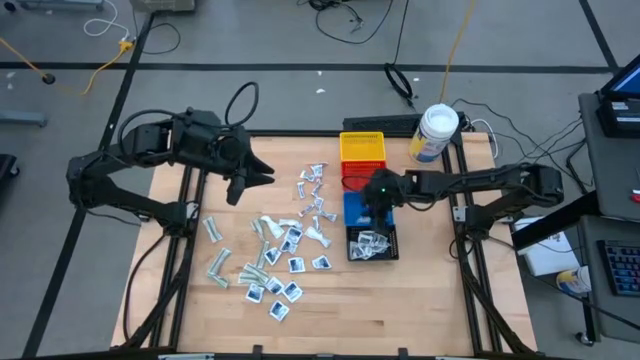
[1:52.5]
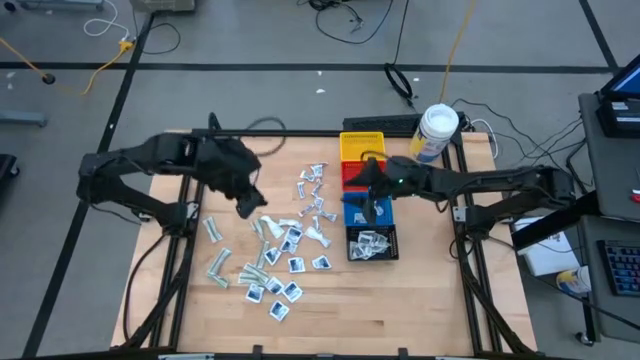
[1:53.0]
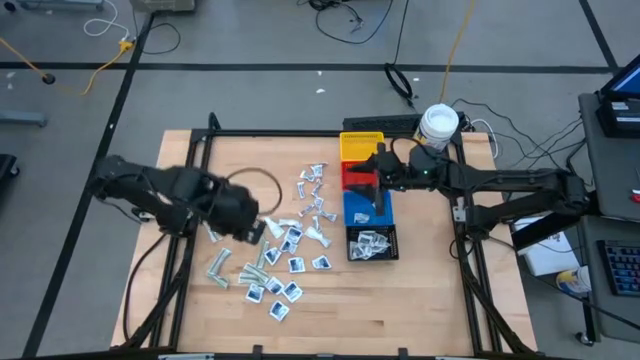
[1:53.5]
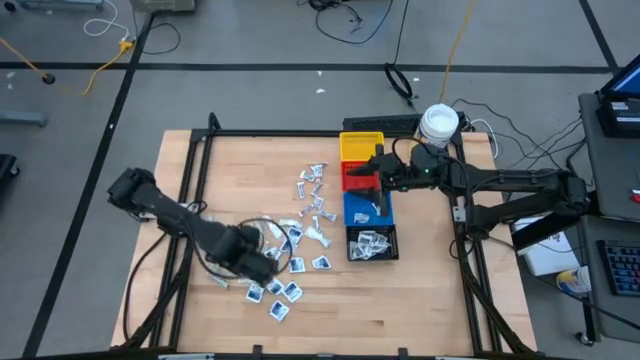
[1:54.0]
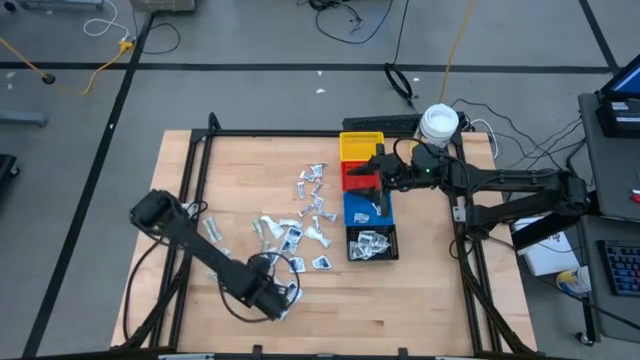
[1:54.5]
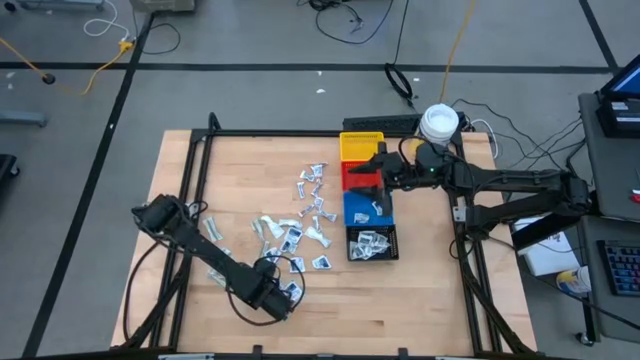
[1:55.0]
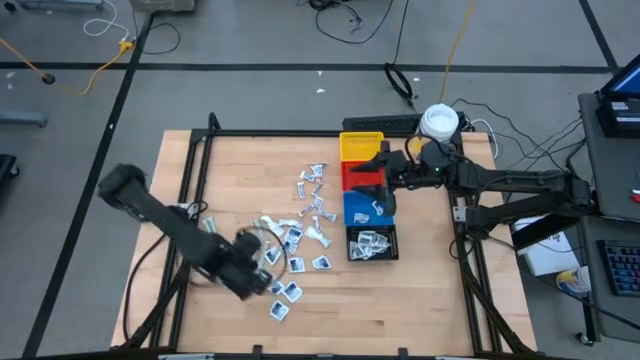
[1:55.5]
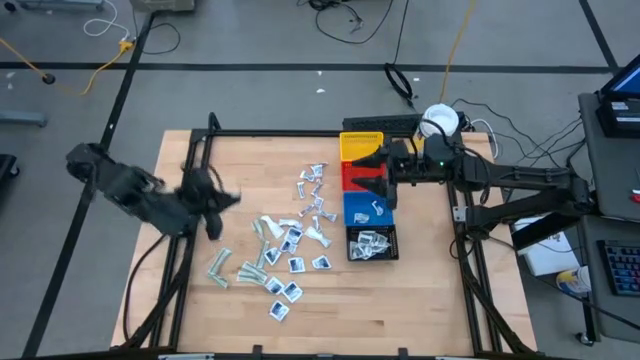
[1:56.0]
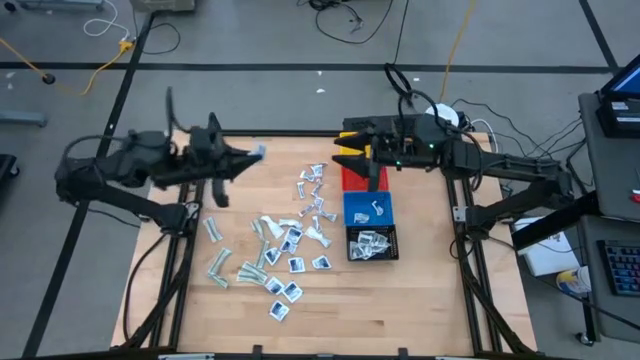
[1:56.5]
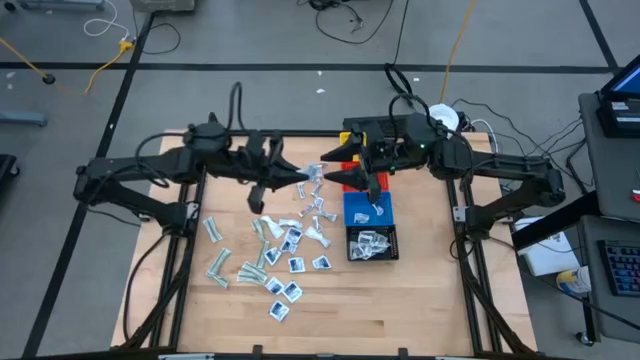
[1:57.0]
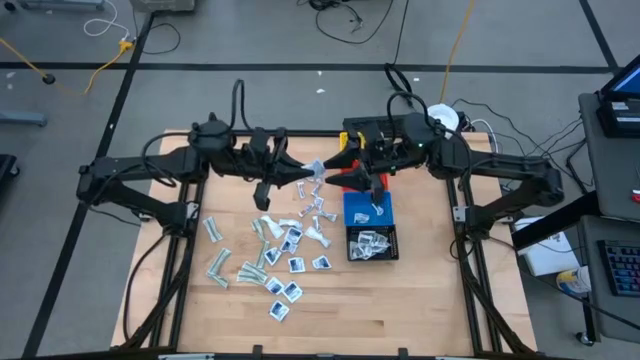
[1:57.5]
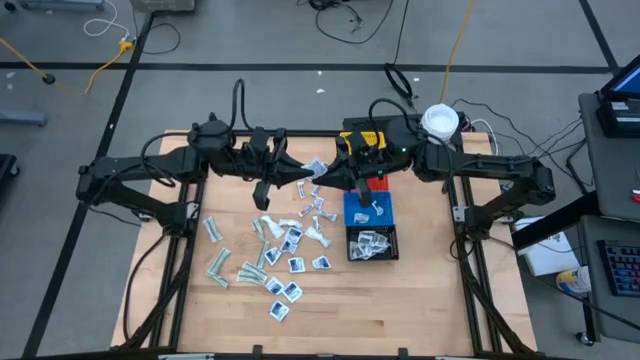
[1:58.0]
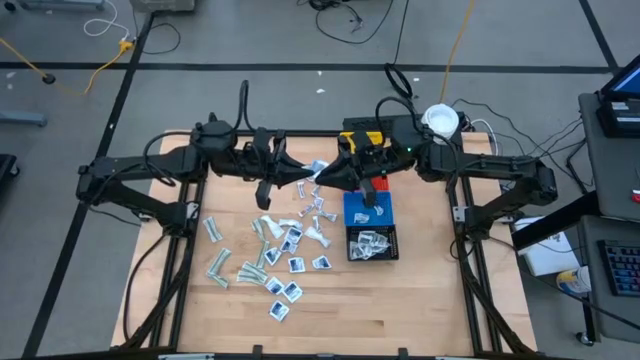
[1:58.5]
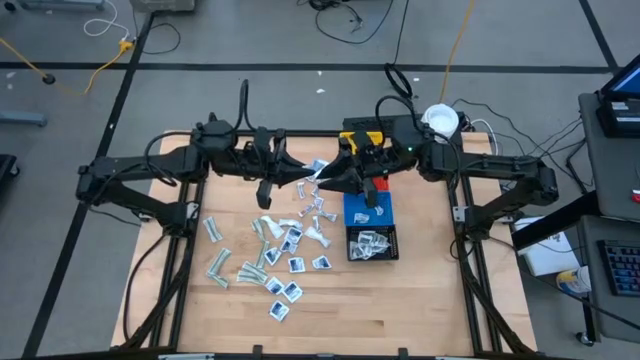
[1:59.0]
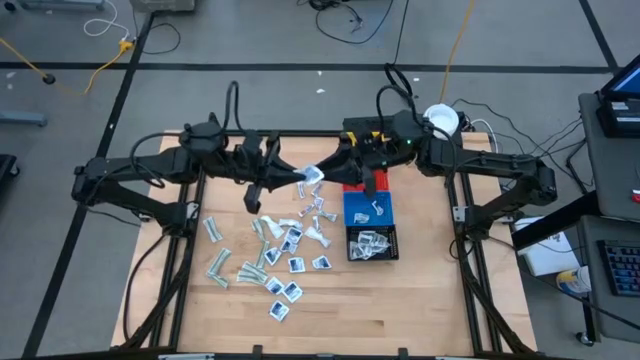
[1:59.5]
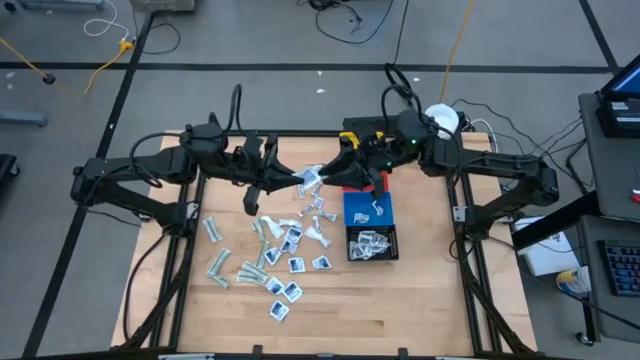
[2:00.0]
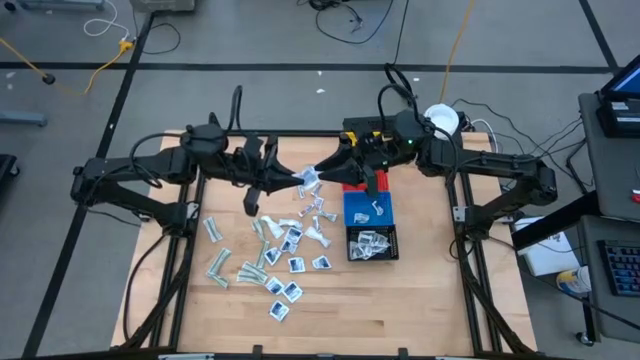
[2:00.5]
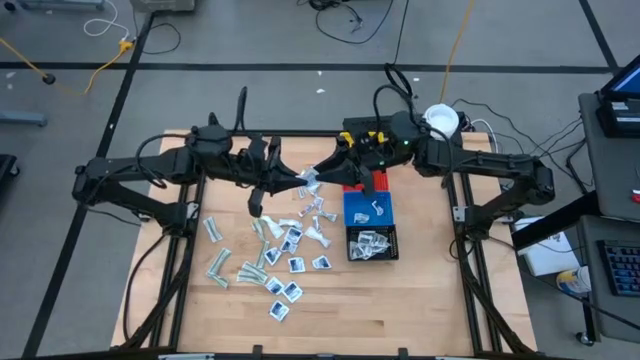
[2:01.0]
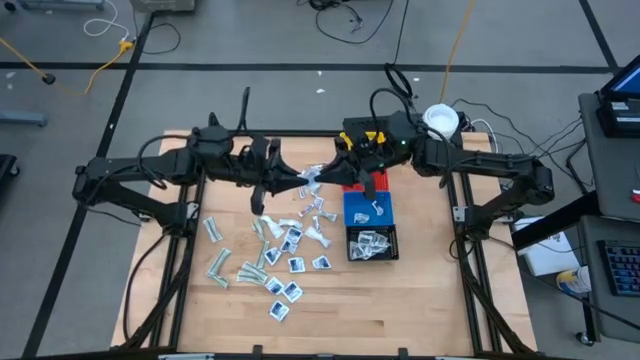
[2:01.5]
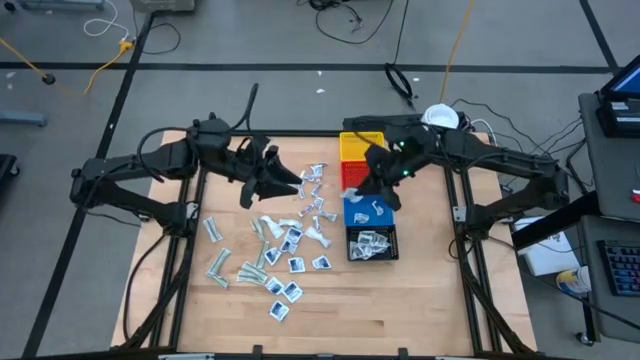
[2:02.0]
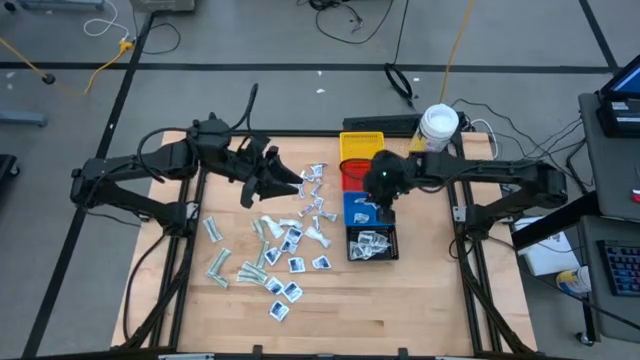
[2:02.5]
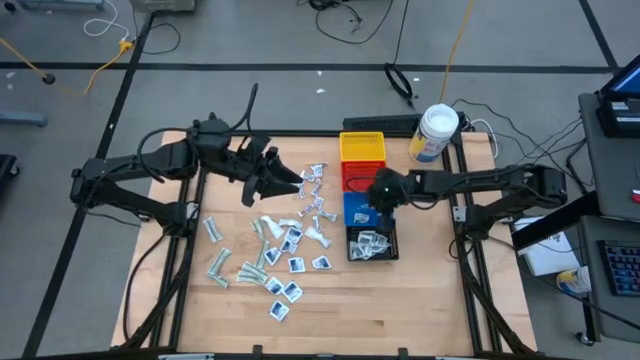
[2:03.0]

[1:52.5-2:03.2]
Task: Pick & Place First Aid Supplies
Put the blue alcohol pad into the blue bin

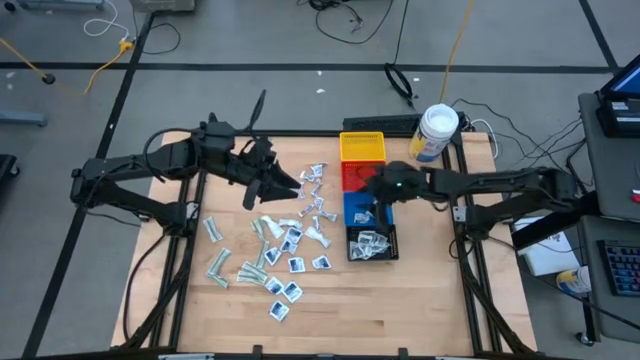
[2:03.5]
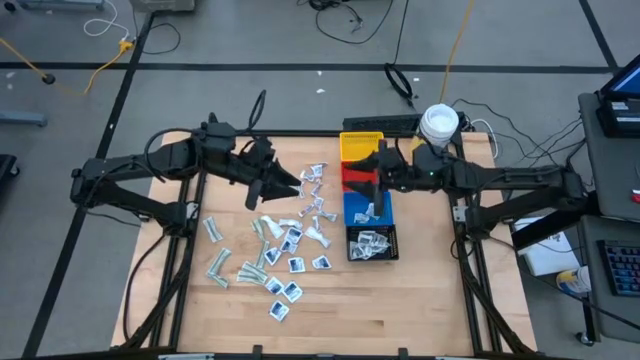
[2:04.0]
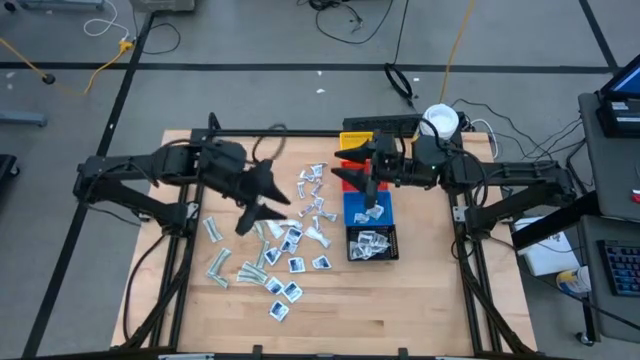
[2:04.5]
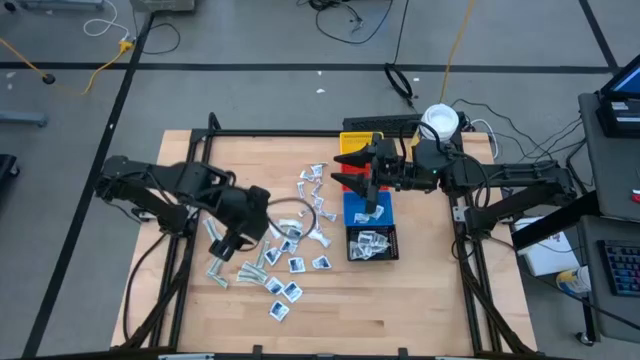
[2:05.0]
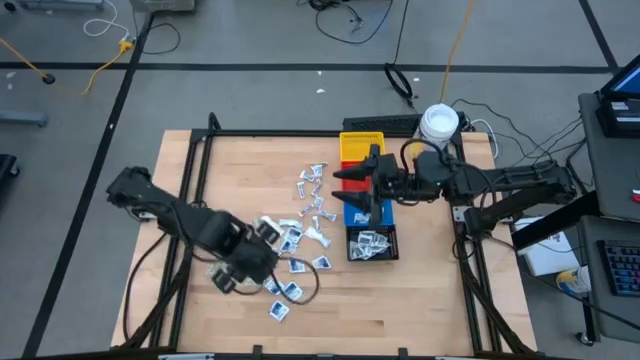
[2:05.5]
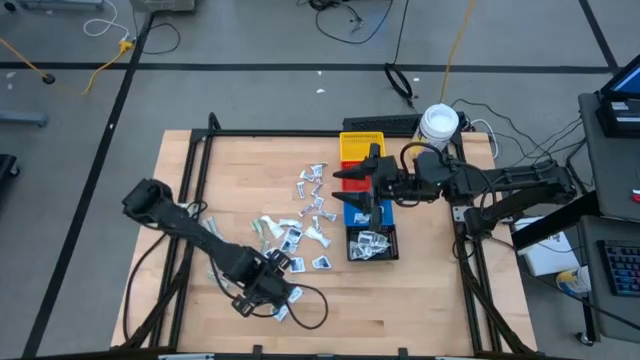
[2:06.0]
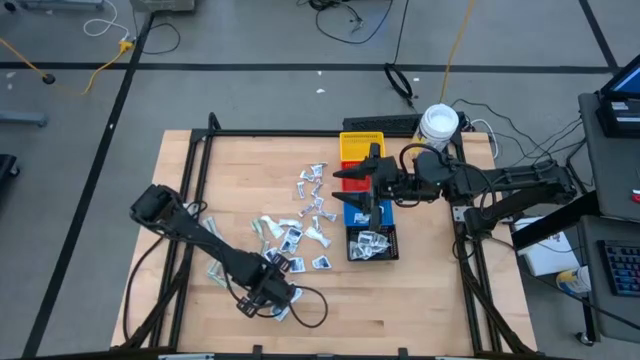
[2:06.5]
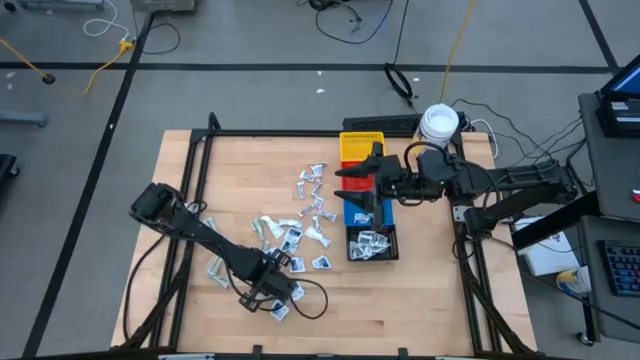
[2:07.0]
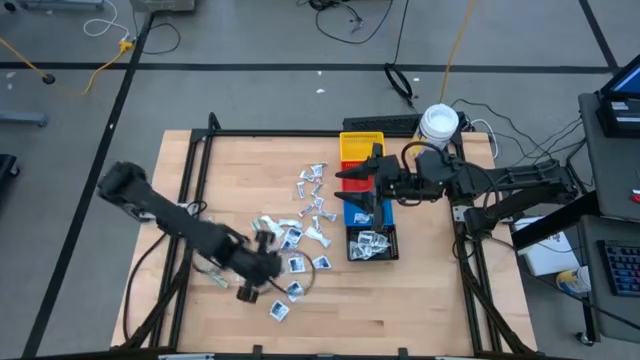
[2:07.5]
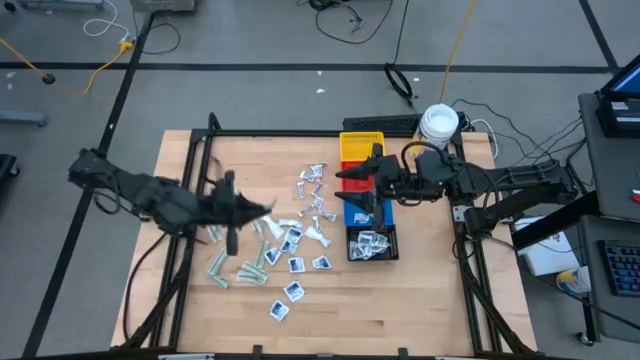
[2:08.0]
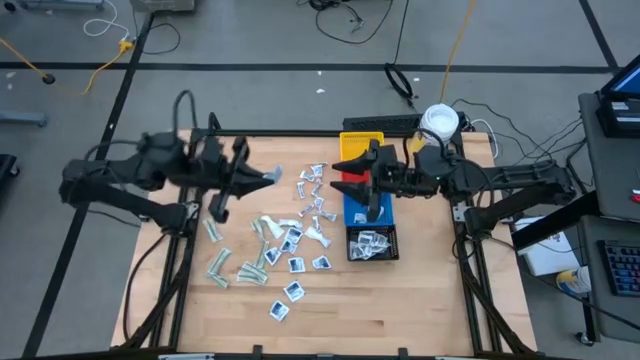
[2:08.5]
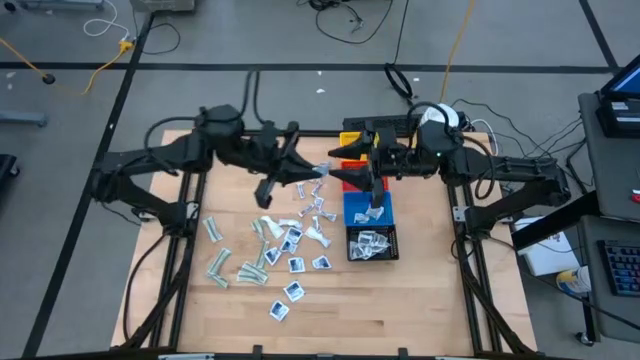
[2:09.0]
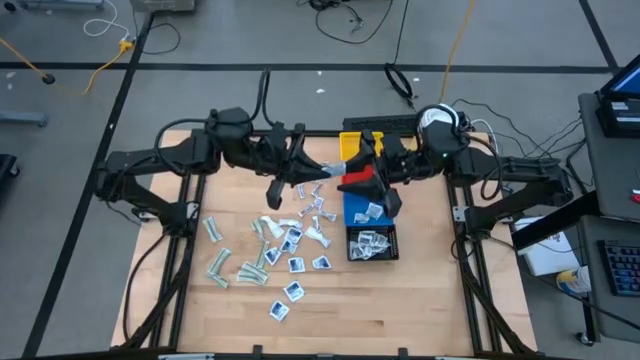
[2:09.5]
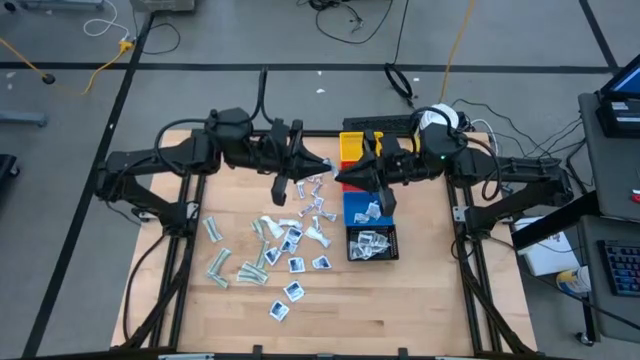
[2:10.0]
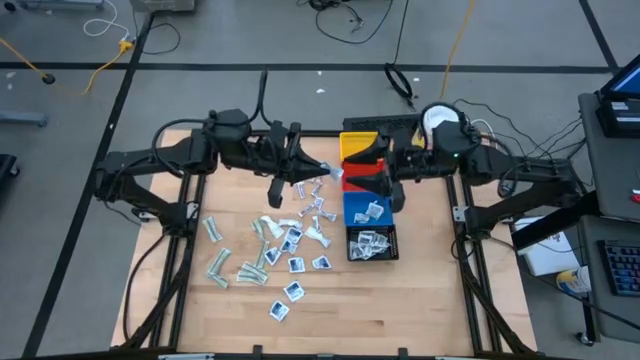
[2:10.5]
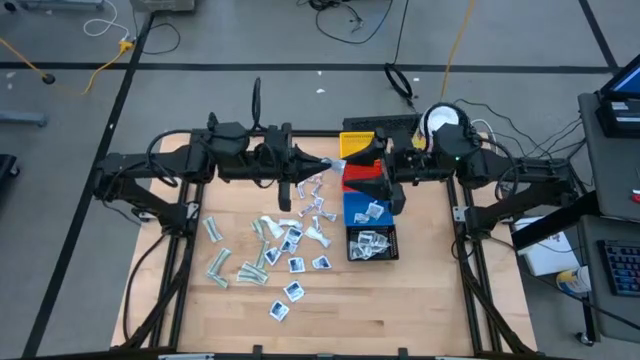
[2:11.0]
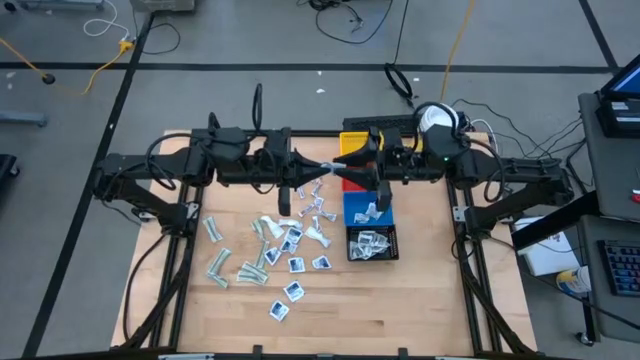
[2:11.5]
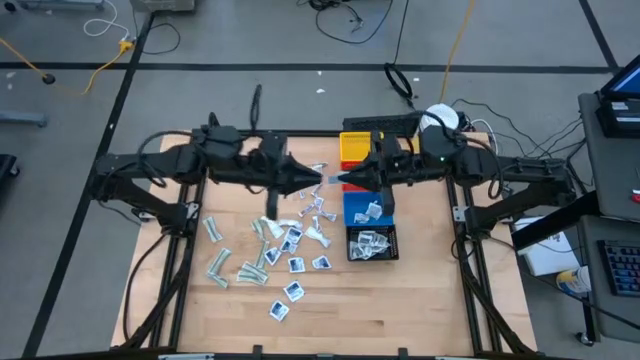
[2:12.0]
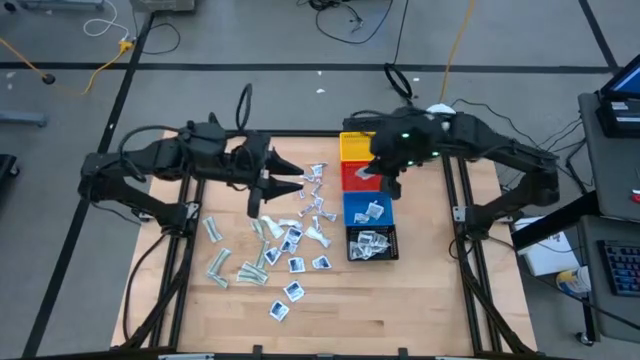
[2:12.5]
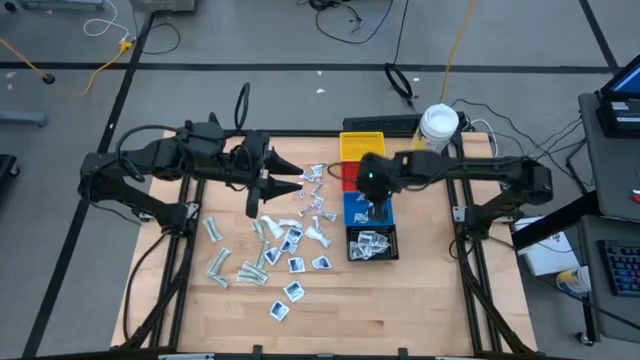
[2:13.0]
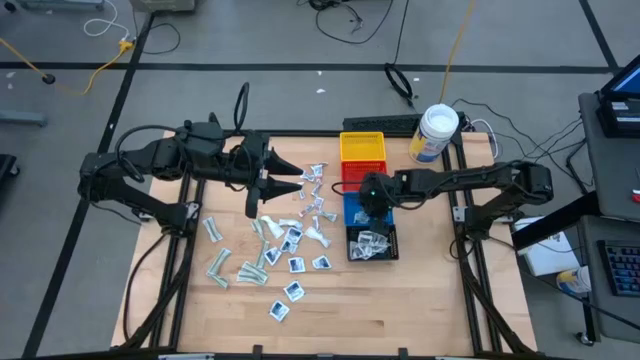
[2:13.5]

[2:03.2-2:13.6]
Put the blue alcohol pad into the blue bin
